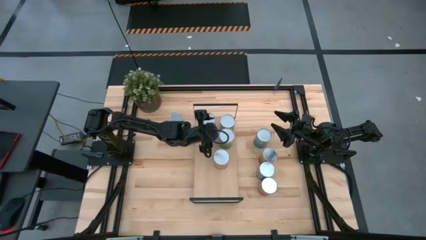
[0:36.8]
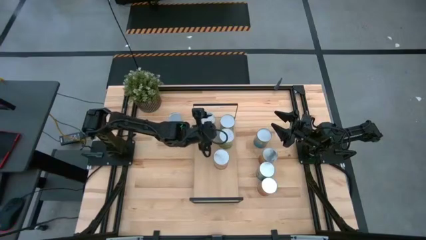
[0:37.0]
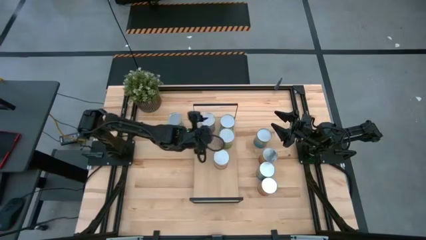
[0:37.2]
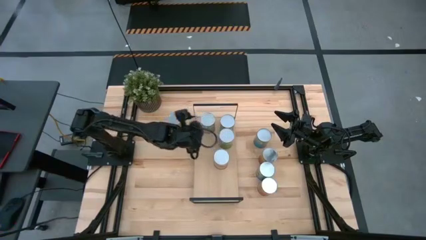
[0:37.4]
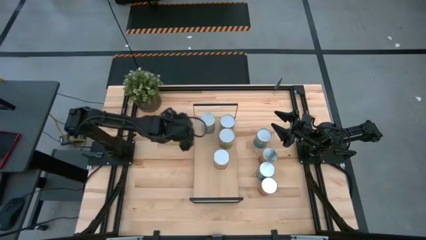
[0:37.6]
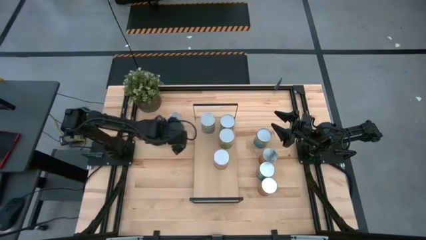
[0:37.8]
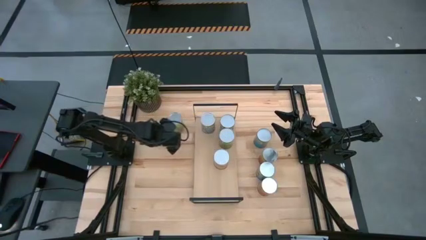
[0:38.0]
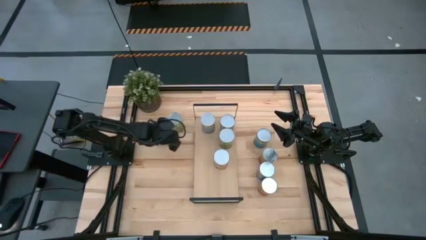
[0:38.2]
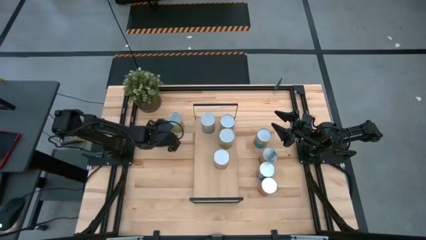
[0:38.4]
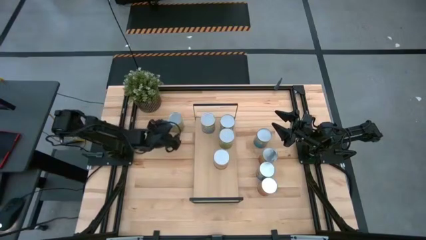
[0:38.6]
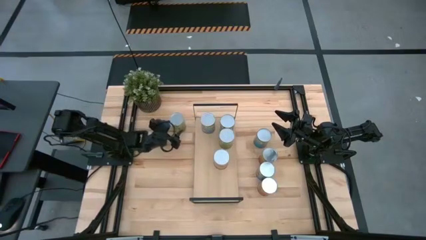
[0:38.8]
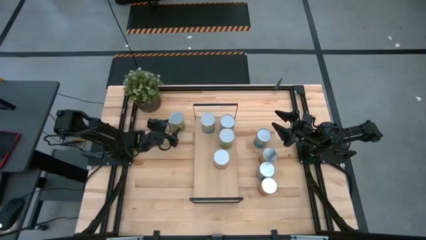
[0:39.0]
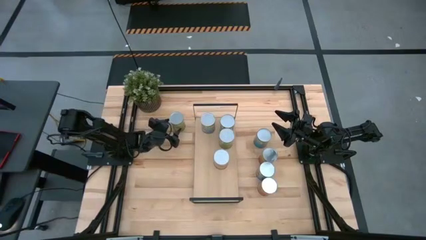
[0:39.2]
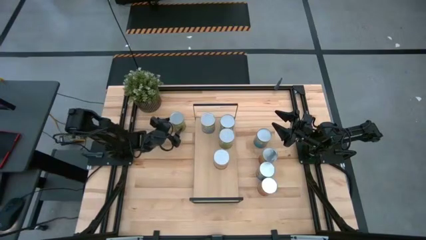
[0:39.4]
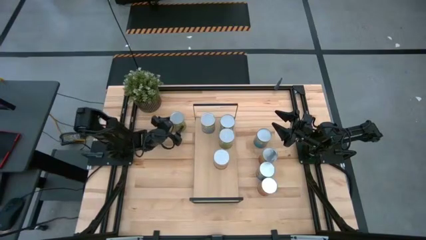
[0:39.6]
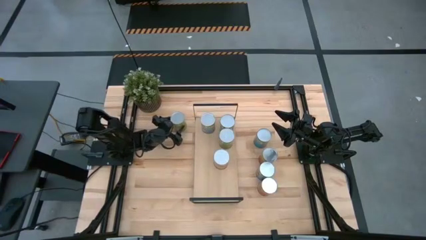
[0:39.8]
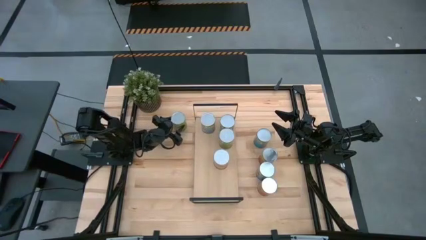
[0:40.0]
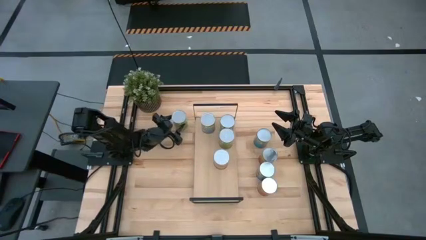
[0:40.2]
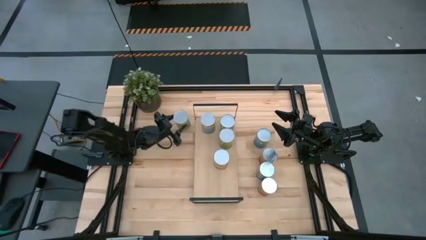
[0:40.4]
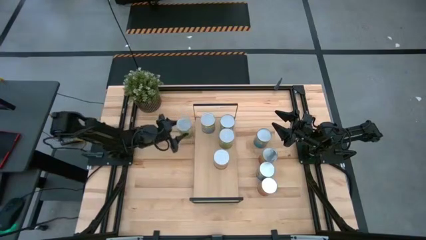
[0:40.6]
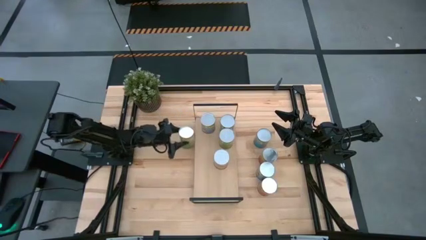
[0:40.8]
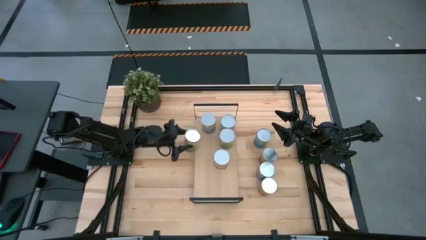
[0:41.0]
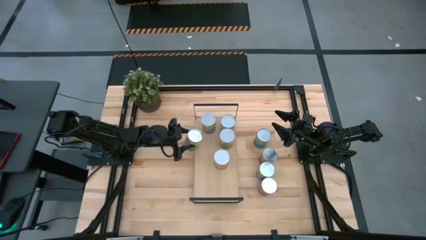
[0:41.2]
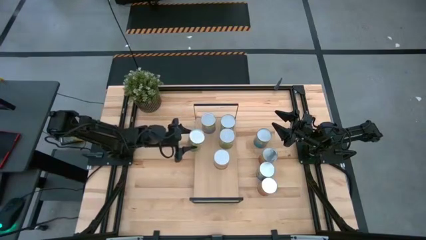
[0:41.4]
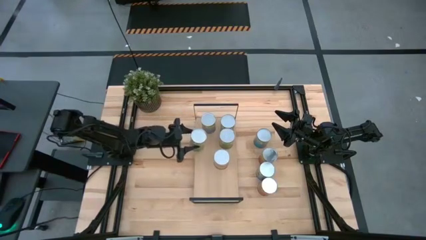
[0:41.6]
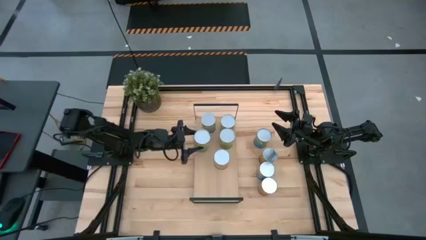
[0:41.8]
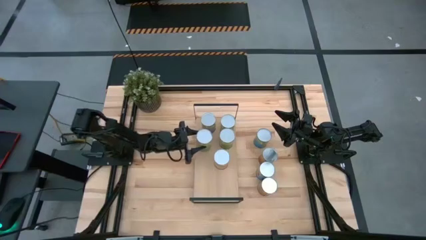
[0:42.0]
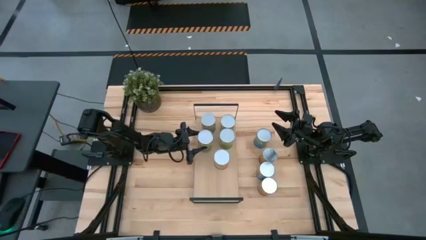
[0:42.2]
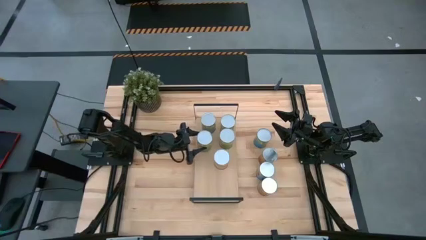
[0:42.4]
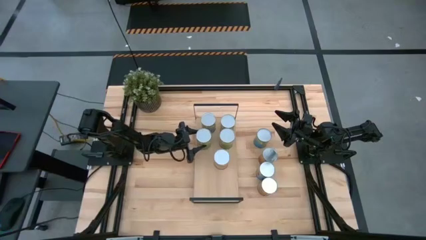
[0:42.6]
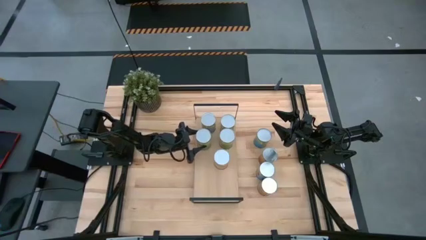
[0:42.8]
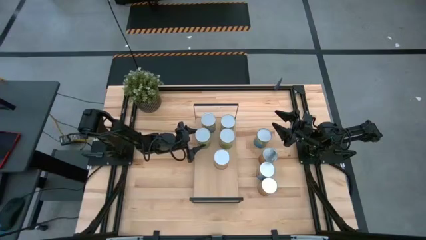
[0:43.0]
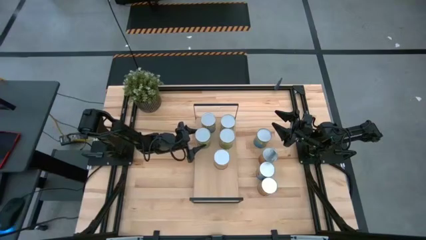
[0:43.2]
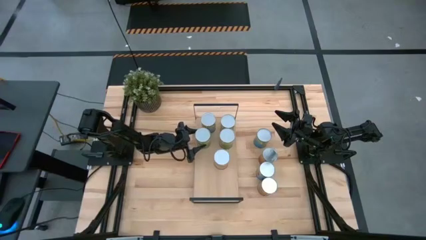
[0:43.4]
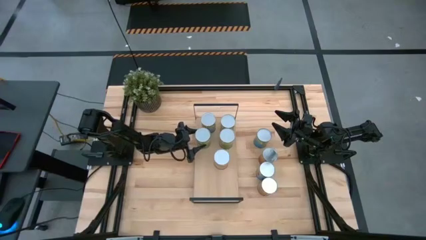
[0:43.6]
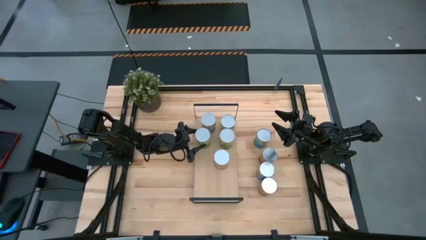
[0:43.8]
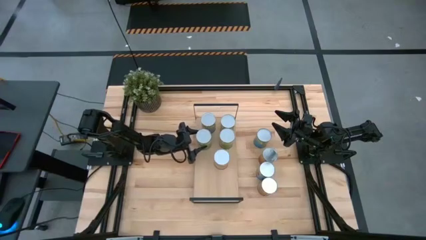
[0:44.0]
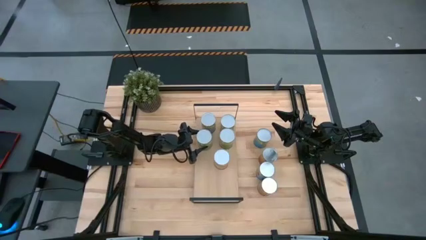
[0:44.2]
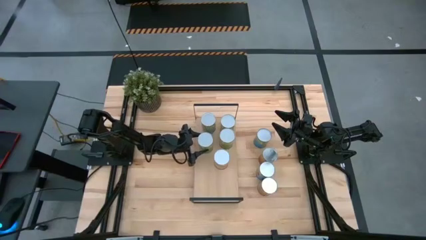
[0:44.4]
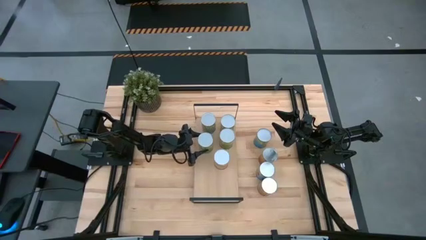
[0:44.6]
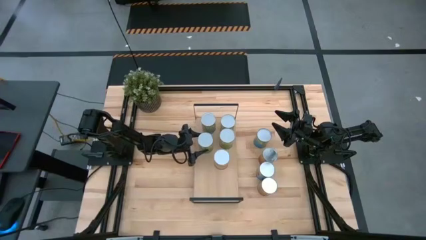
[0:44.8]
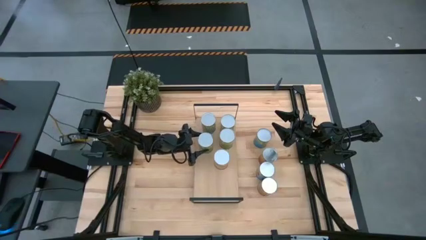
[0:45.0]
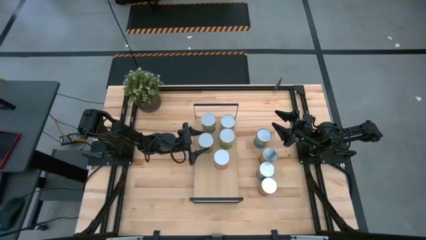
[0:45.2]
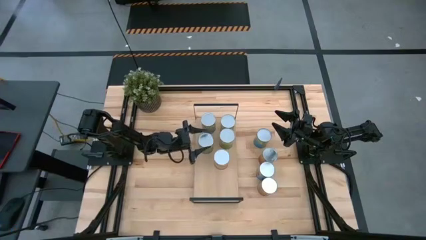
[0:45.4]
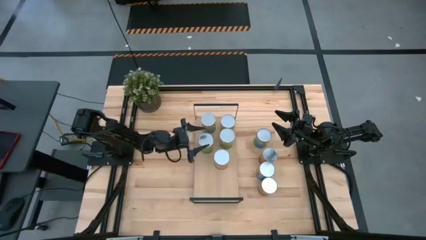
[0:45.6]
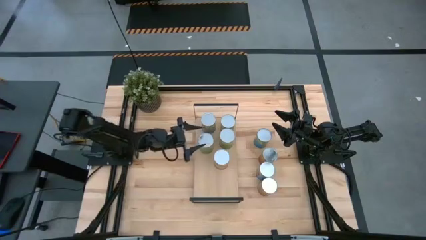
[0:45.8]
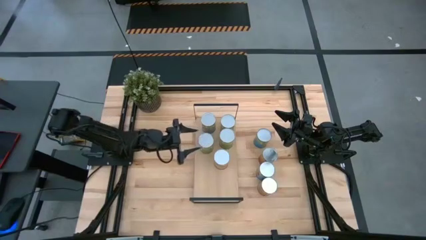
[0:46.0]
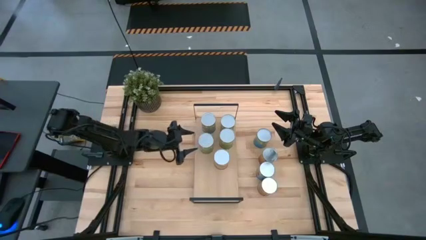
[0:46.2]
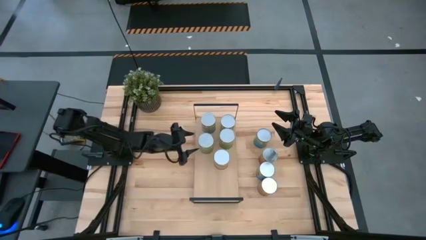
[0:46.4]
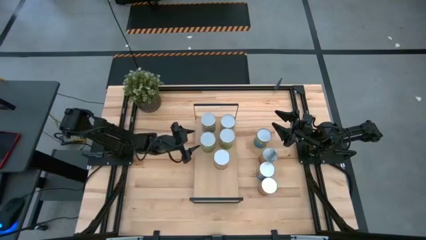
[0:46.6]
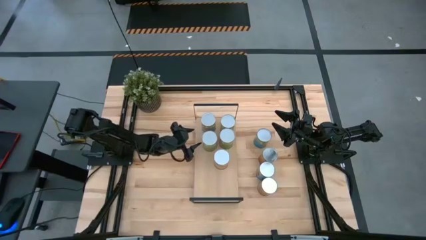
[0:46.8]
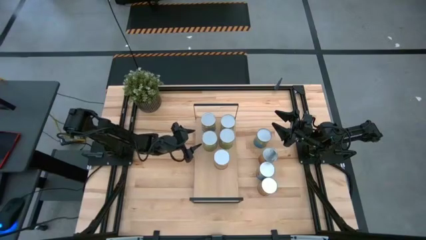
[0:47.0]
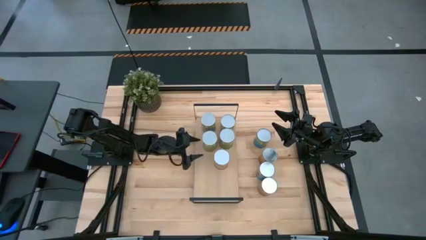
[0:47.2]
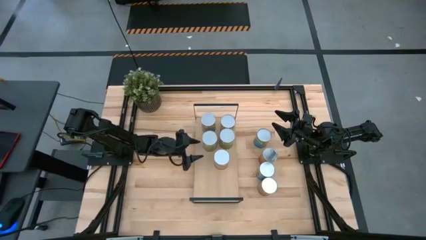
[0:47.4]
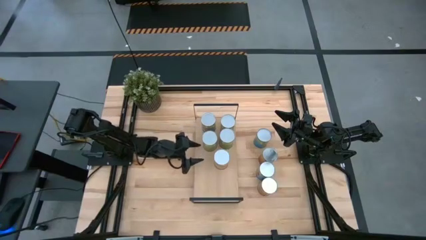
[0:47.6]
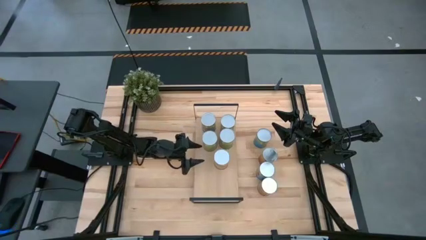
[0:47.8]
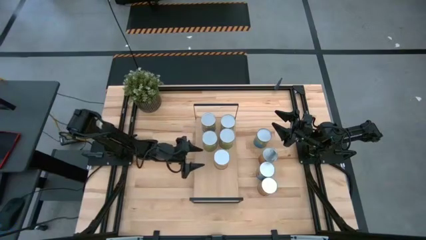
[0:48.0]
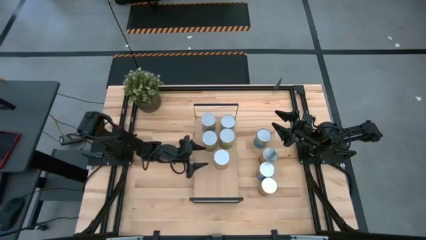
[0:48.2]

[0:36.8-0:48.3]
Task: Pick and place cans onto a shelf
Put the canned oranges on the shelf aligned with the other canned oranges

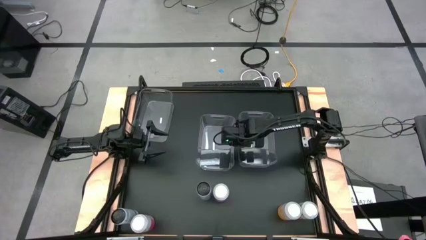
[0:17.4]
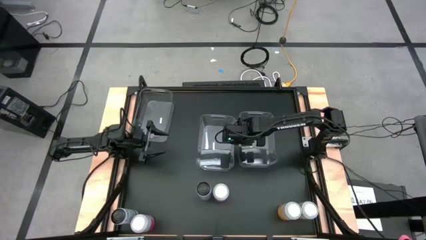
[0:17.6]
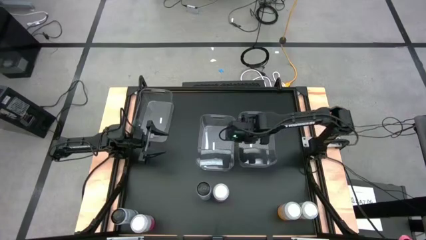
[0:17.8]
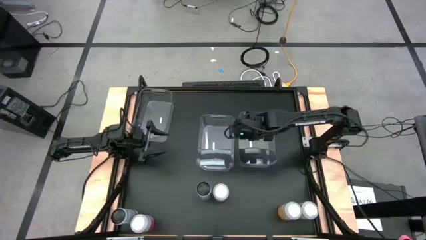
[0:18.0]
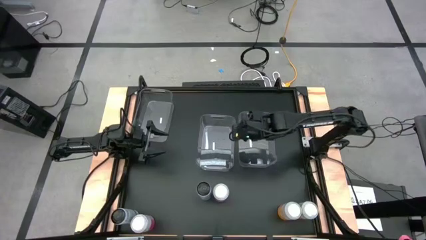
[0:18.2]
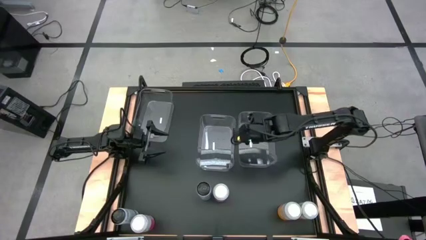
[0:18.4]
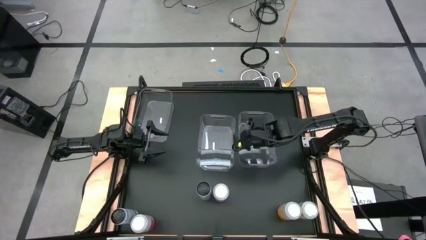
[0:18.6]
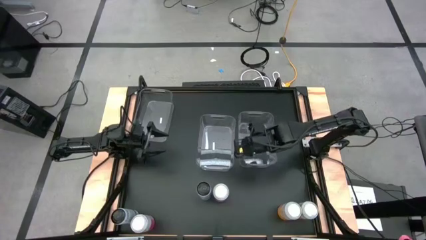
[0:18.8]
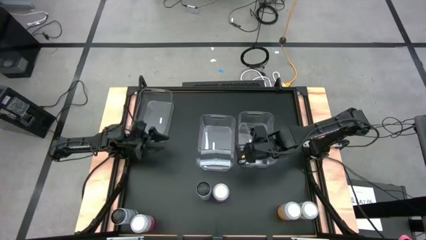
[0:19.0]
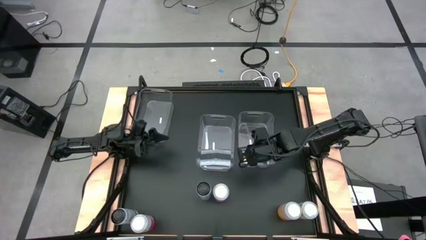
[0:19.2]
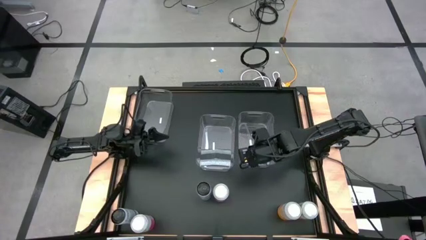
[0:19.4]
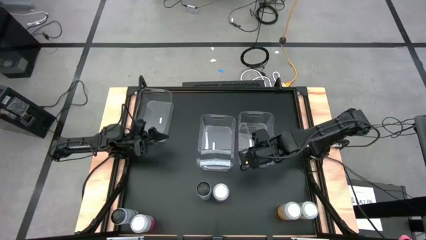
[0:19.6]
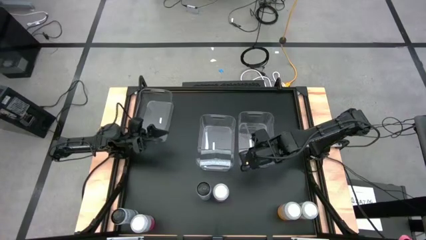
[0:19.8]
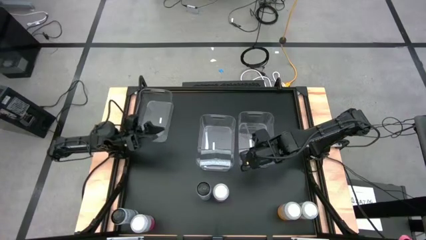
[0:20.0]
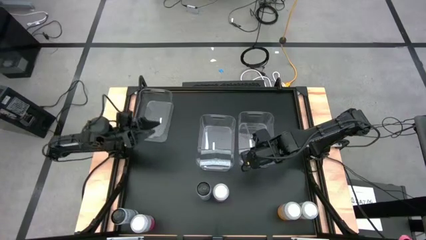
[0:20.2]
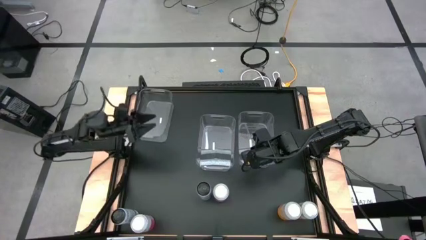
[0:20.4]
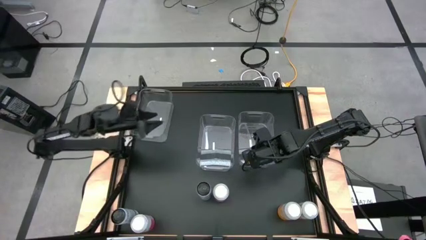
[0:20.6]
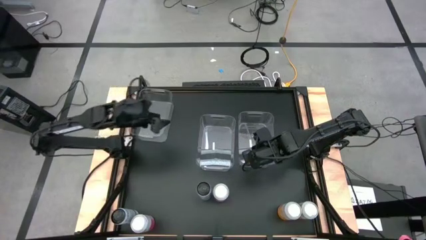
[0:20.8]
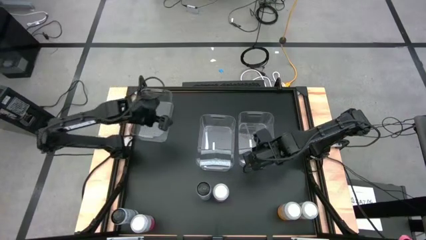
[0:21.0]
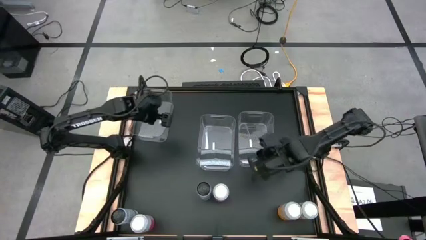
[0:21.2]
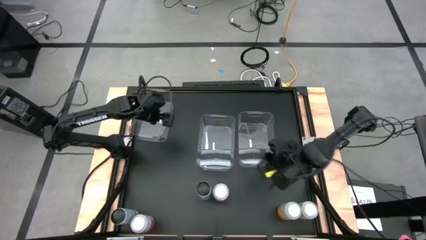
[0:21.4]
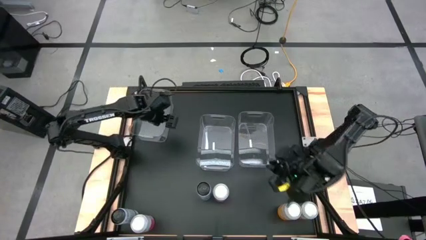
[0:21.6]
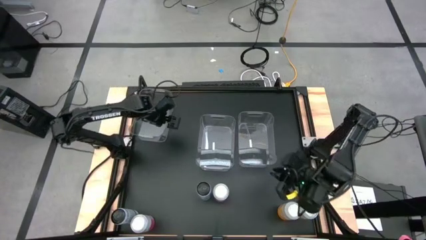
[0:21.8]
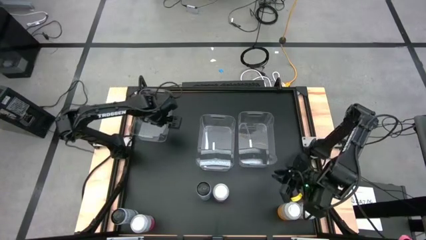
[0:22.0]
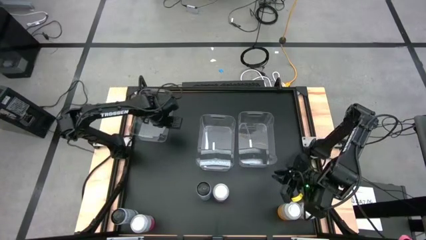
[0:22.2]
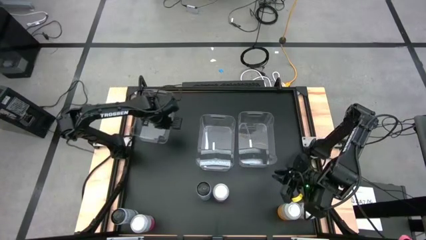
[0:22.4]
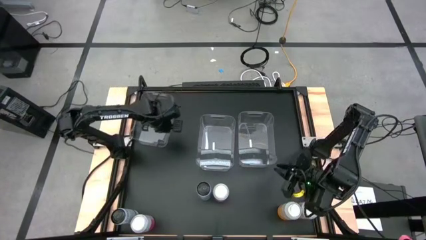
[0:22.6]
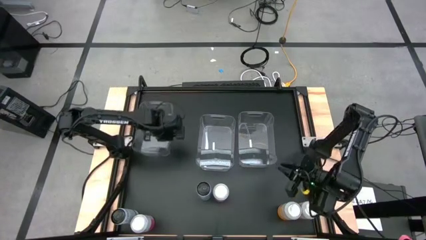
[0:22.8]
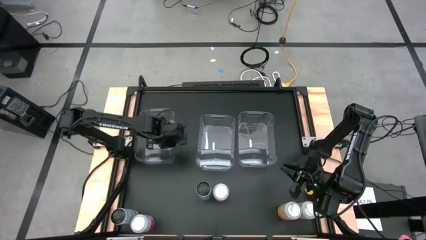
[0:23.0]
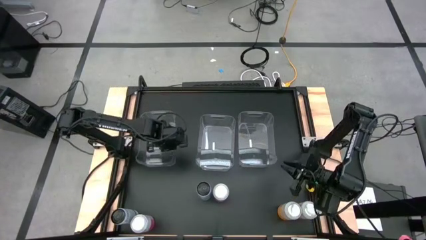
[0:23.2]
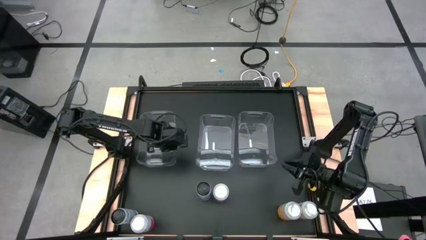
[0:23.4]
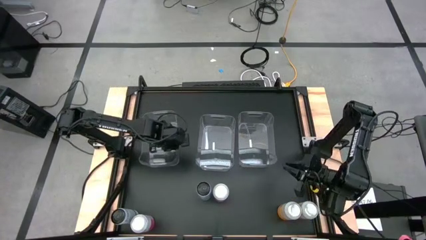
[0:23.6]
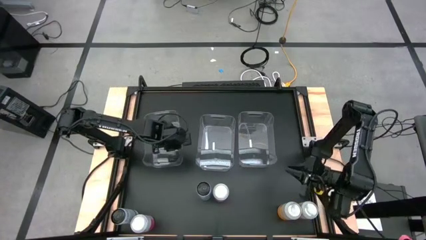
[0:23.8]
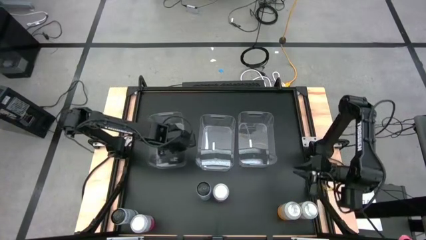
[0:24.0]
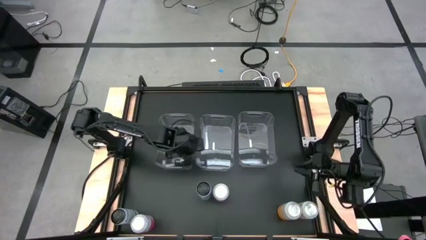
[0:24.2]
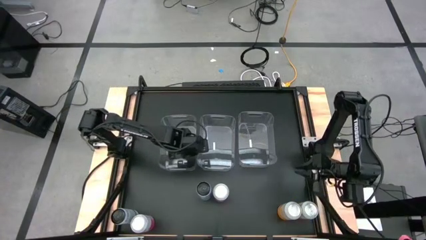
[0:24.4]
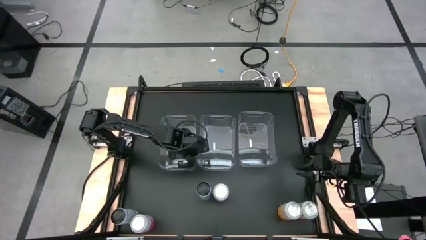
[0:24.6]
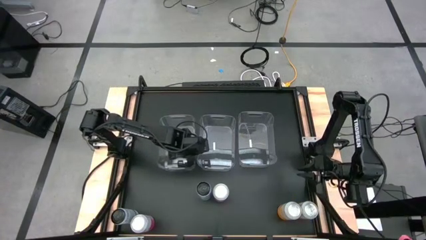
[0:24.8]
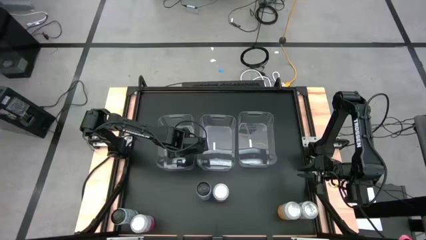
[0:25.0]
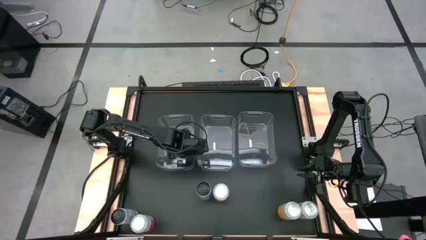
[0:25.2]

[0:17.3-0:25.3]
Task: Sort soda cans
Move the right transparent bin to the left side of the middle transparent bin
